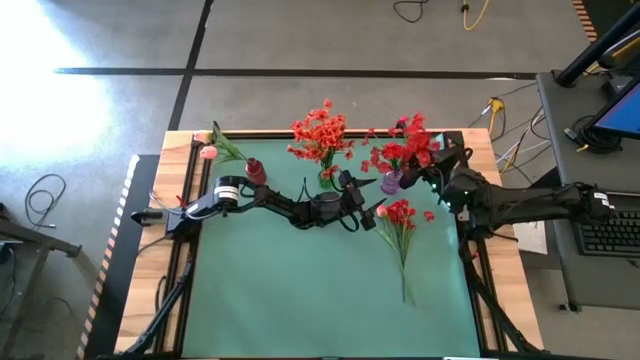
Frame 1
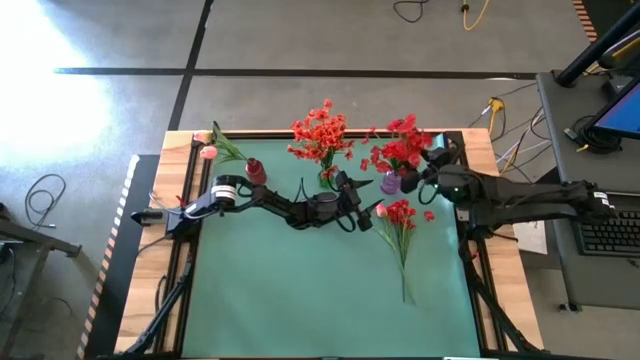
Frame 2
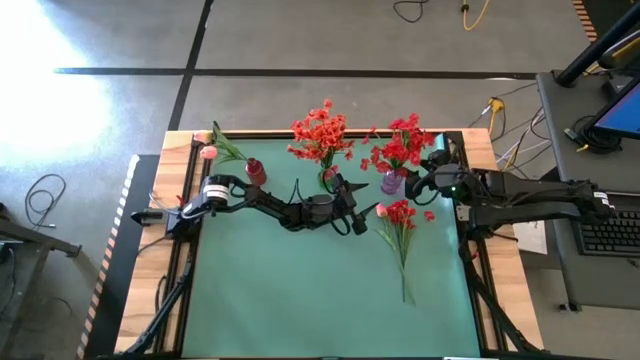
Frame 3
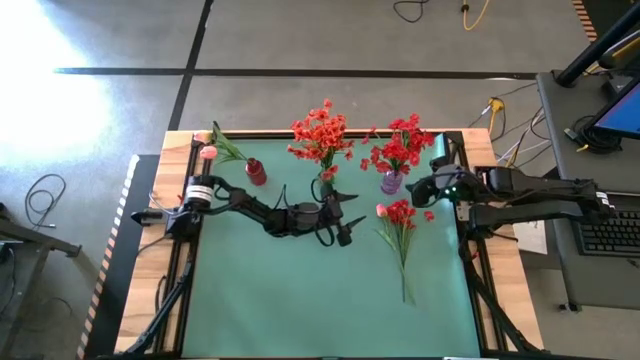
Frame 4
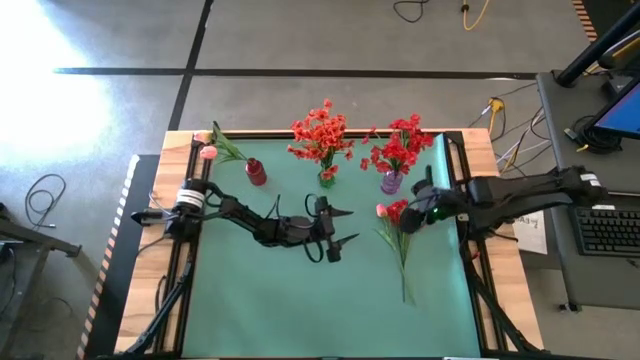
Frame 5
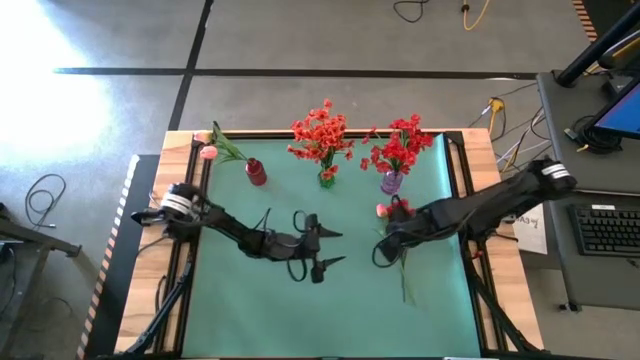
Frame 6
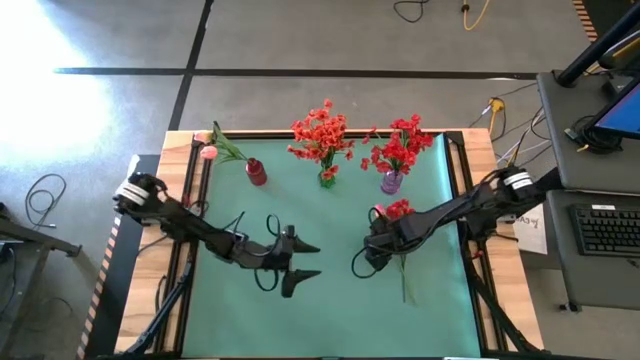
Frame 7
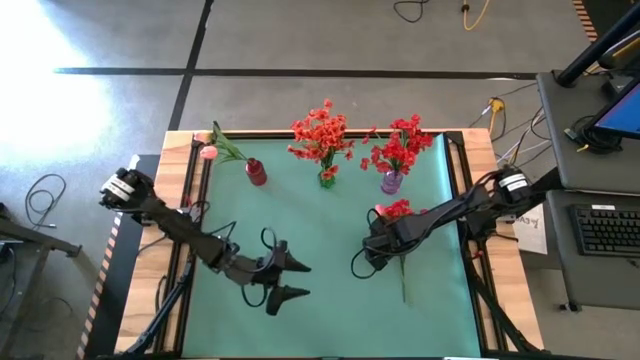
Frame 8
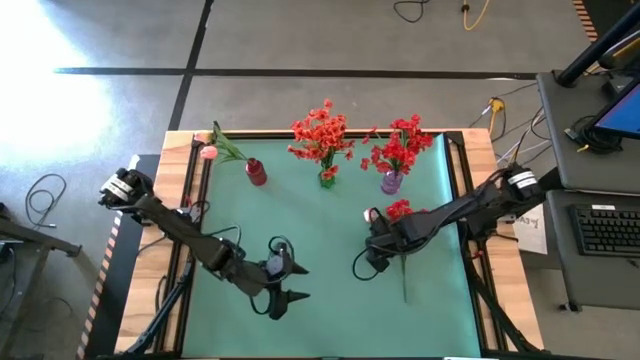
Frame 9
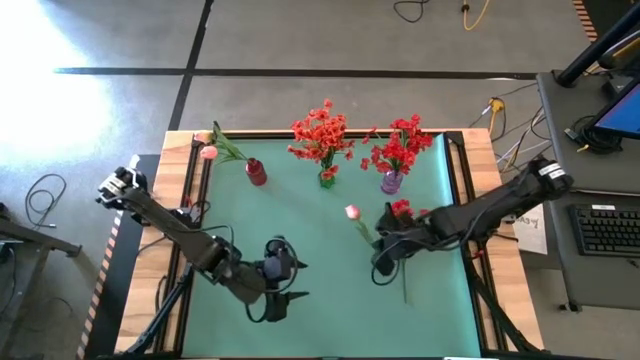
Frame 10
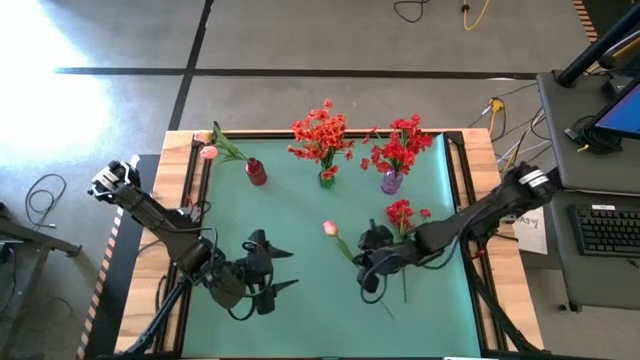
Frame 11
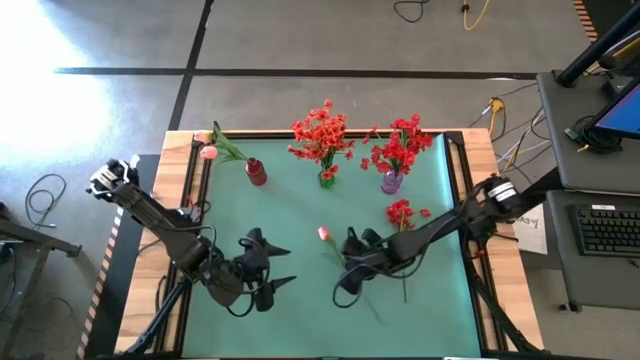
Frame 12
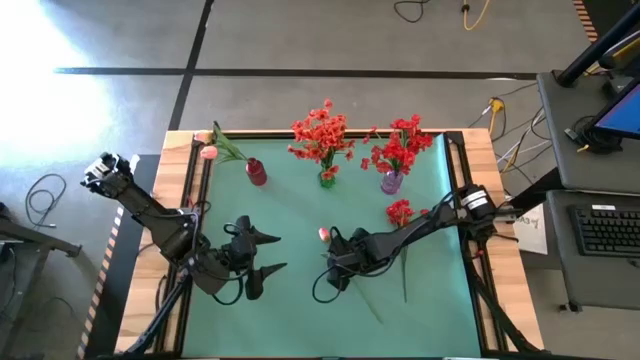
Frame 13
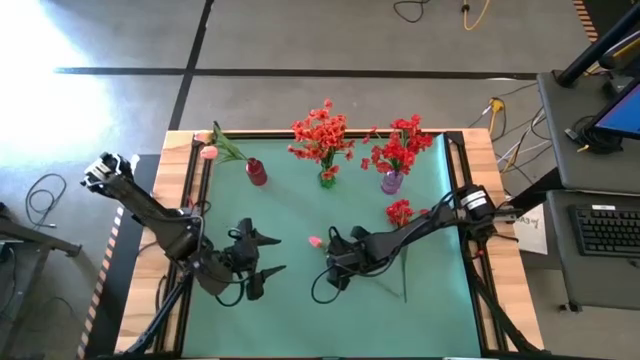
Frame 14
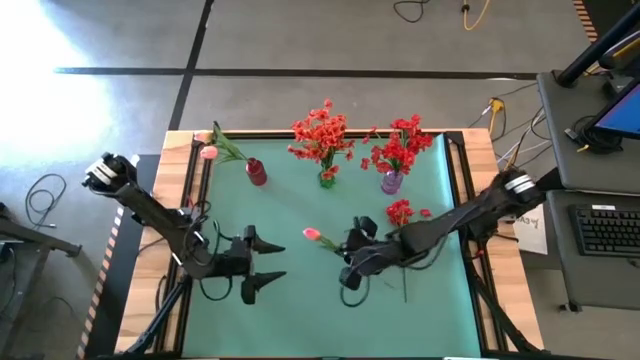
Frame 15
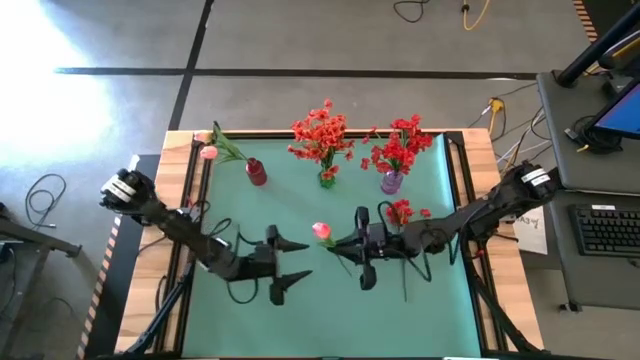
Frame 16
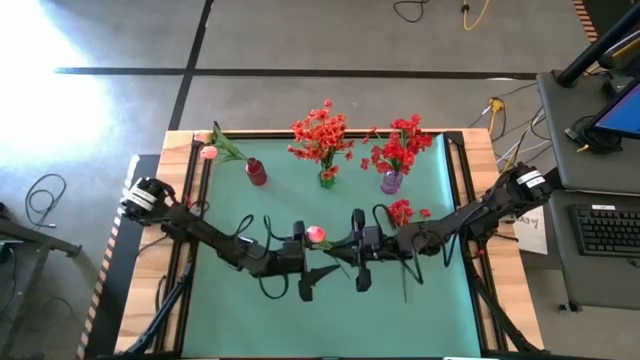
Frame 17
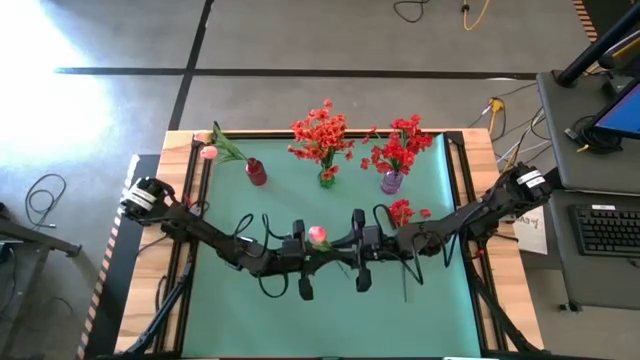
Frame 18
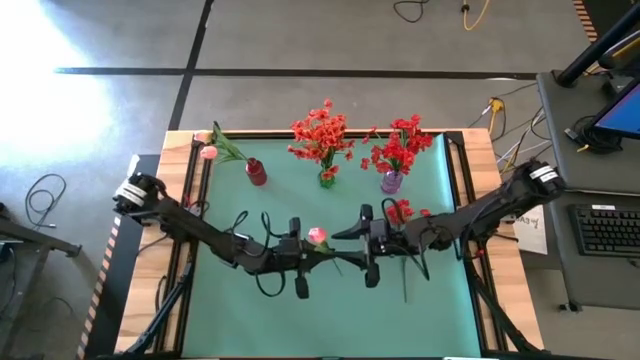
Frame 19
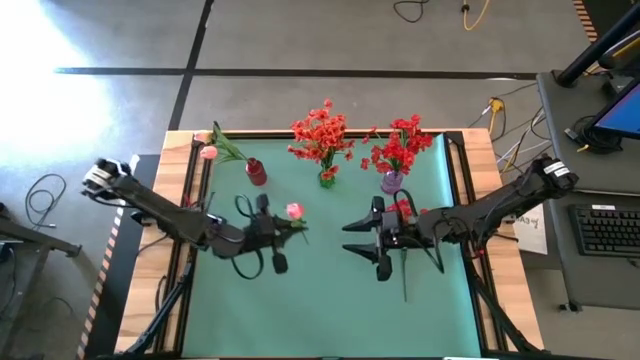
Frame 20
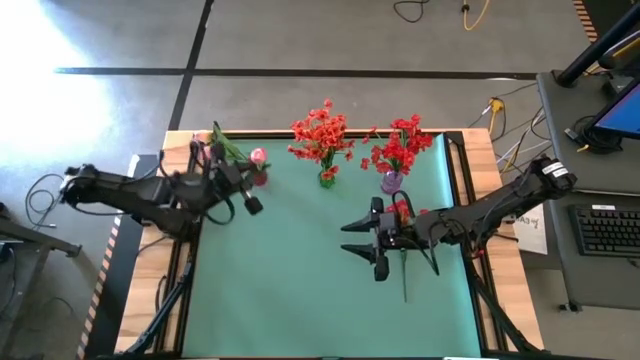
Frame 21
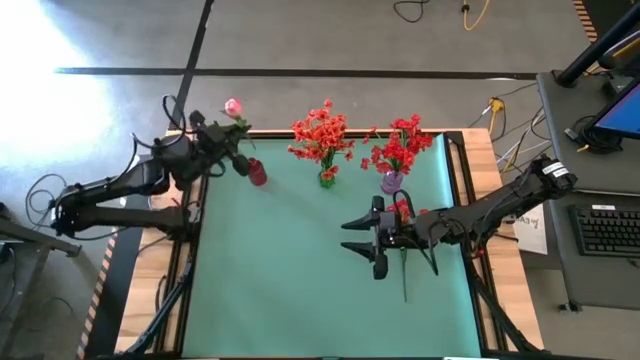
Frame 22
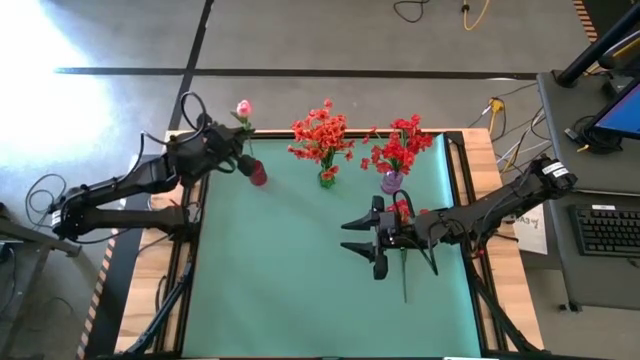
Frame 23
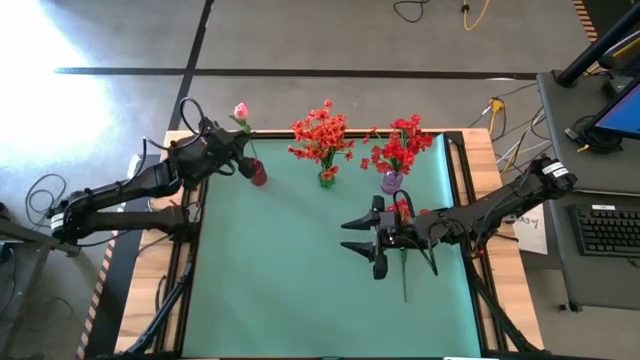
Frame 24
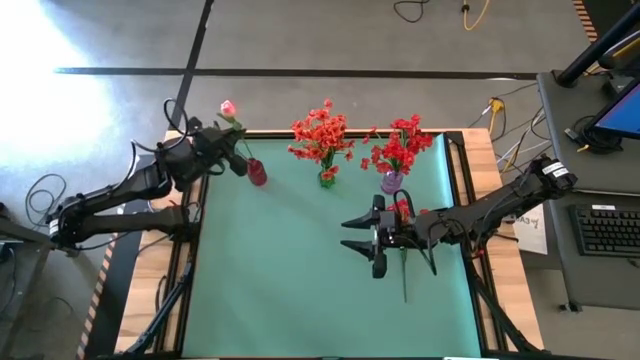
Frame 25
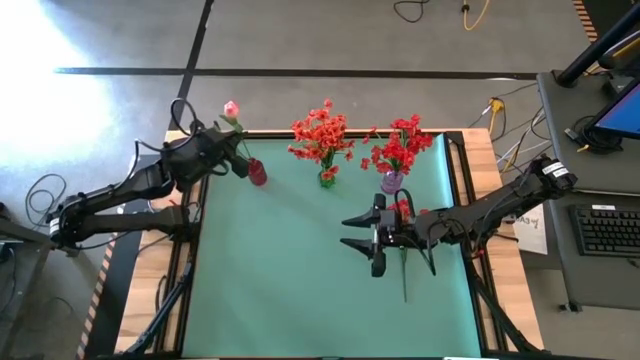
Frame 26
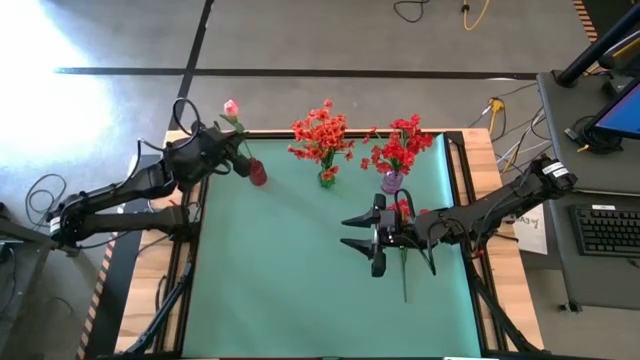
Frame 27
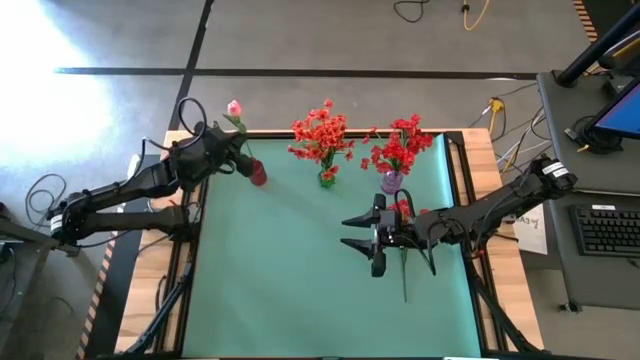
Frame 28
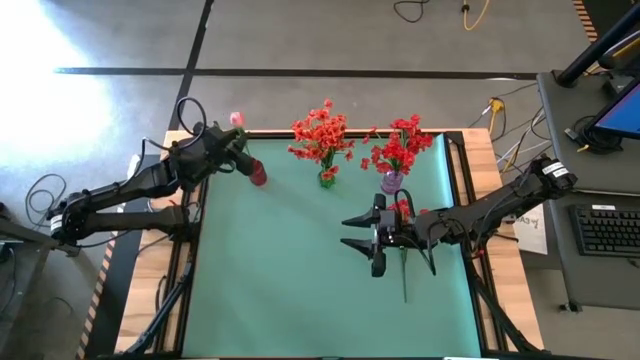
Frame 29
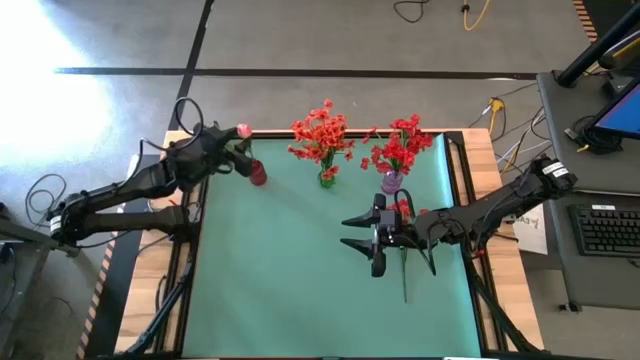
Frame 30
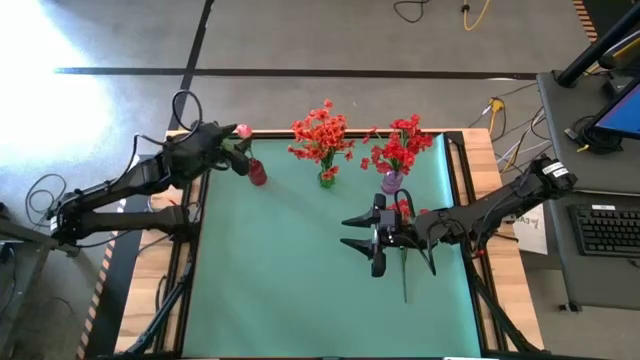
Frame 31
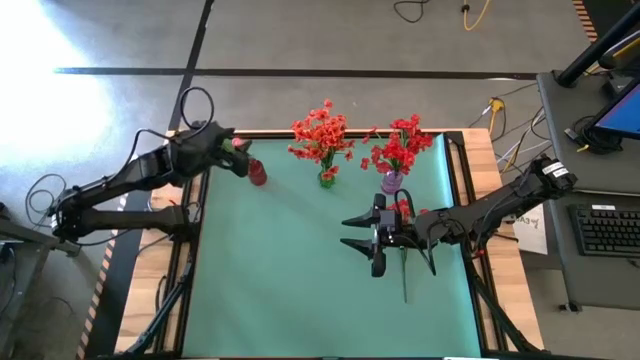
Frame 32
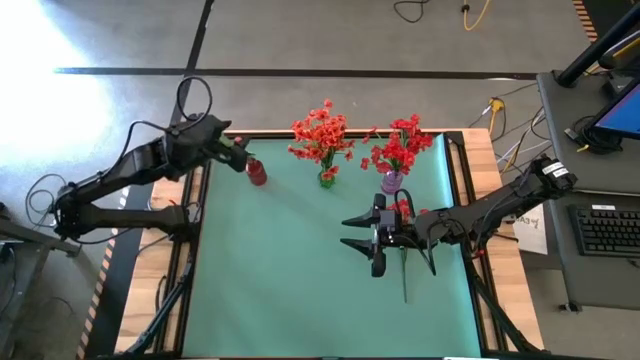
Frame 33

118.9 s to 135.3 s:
Task: Sort flowers into vase by color
Put the pink flower in the red flower vase

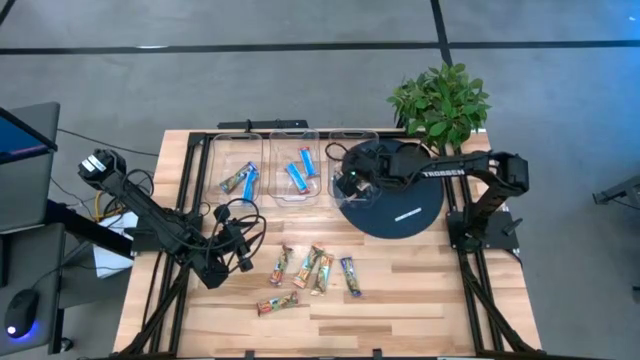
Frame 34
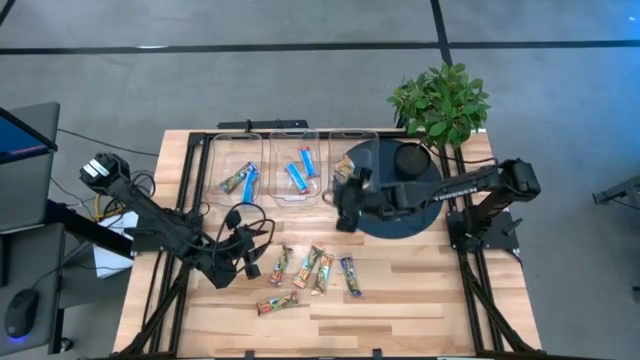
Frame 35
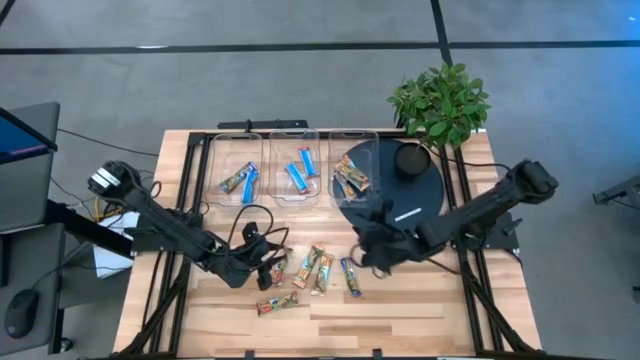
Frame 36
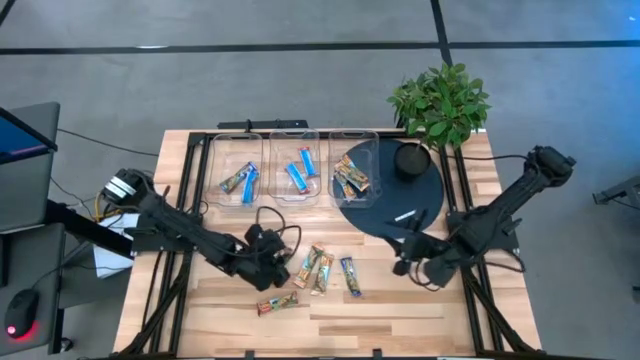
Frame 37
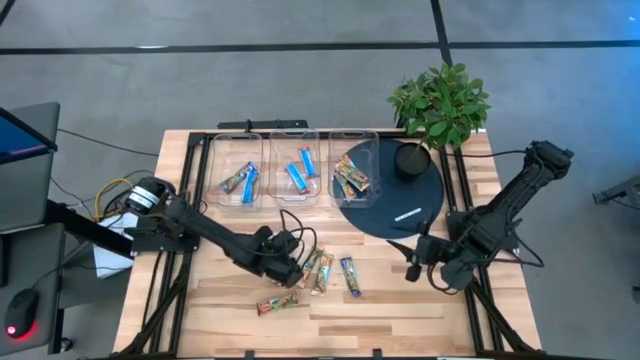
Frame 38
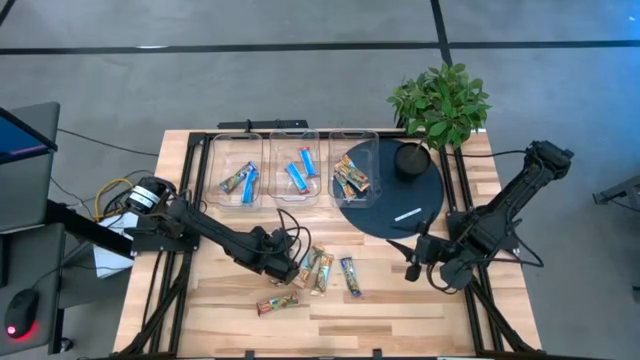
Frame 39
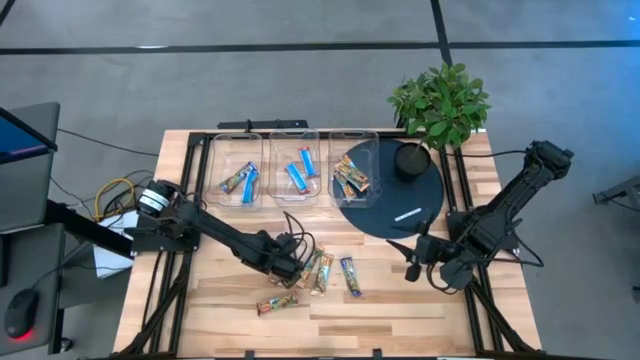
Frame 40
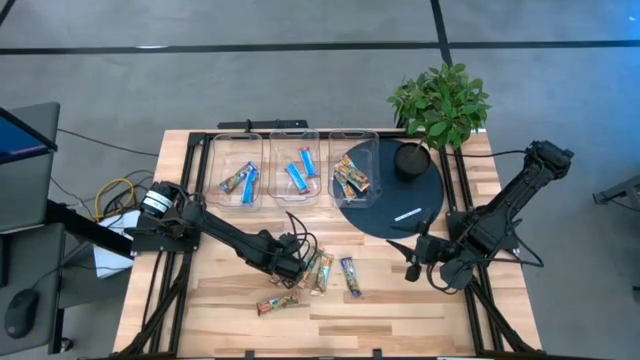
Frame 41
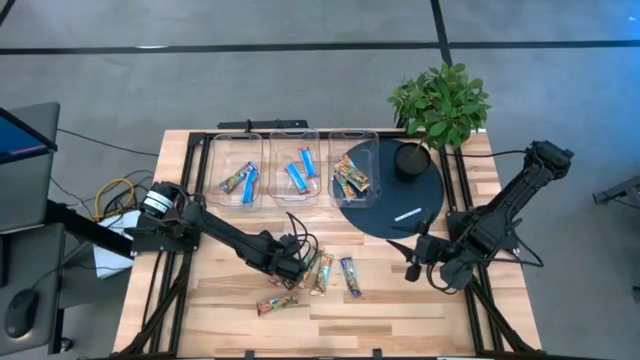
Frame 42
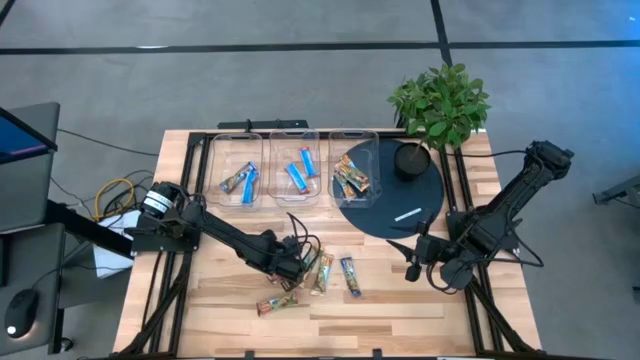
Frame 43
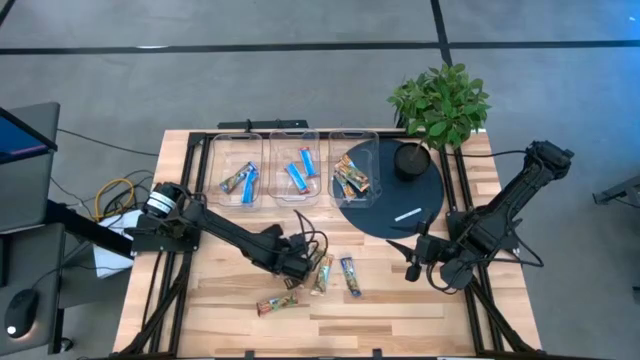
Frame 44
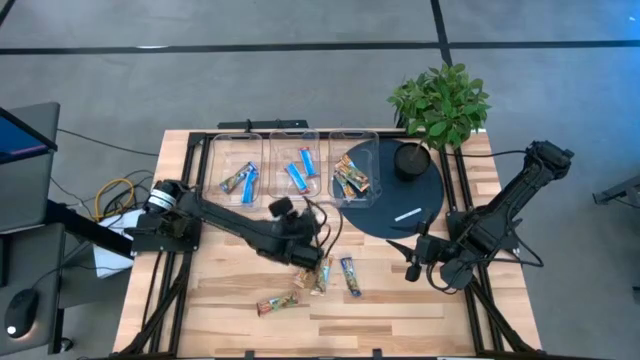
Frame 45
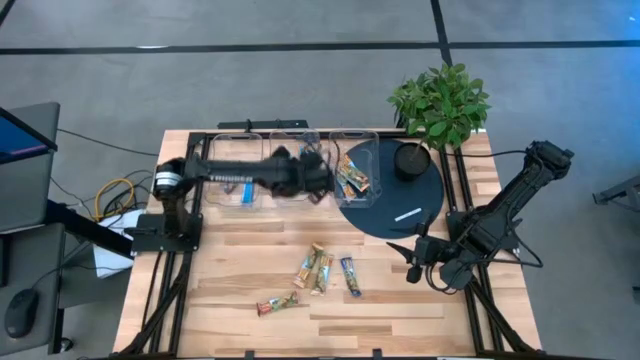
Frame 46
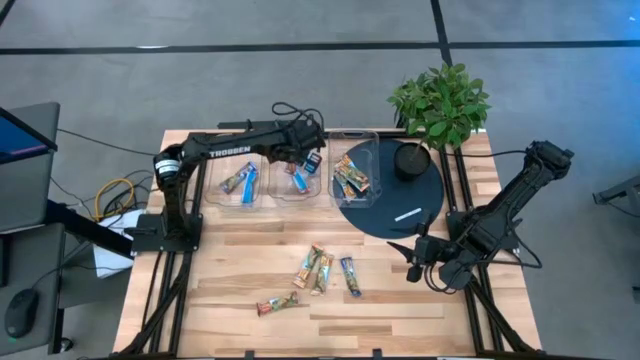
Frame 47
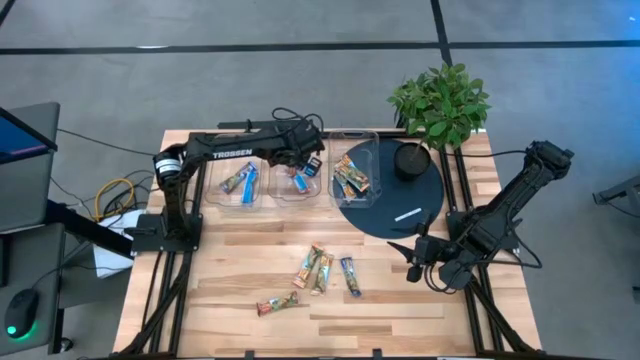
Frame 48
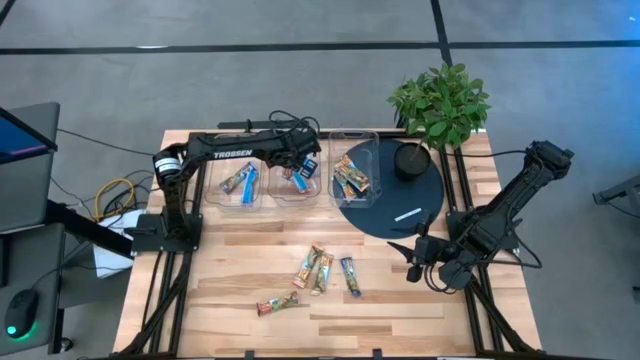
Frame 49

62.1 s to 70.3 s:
Task: Pick and place Granola Bars by type
Put the top red chocolate chip into the center transparent bin
